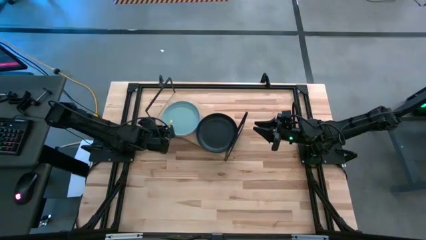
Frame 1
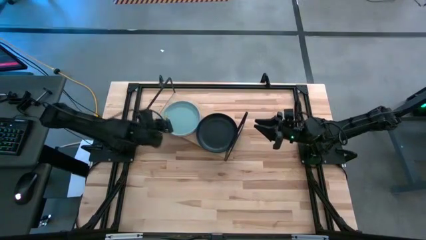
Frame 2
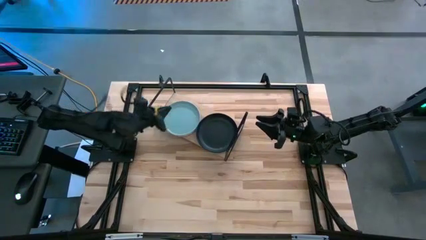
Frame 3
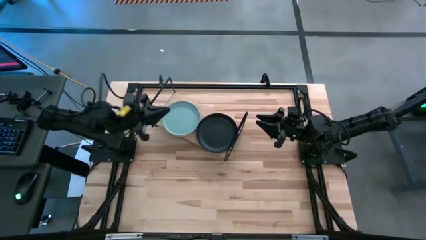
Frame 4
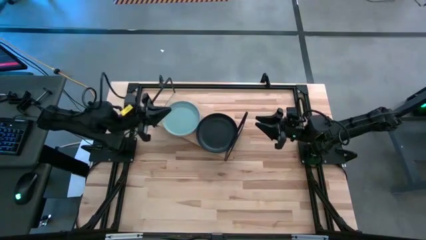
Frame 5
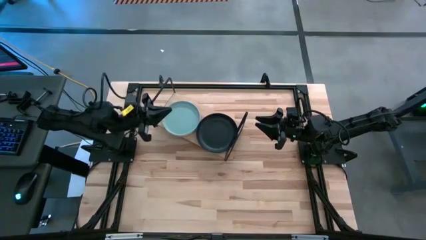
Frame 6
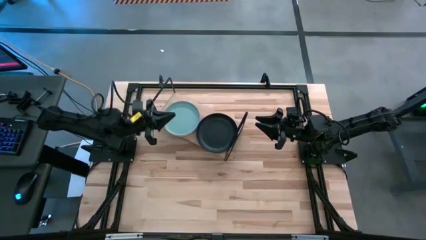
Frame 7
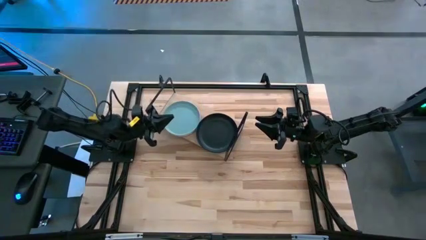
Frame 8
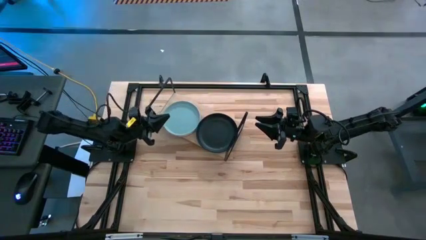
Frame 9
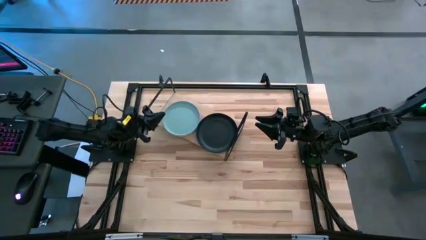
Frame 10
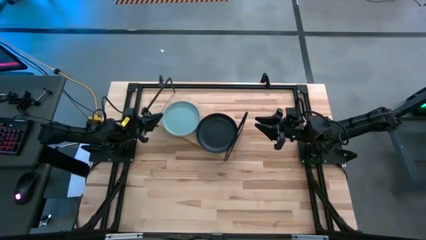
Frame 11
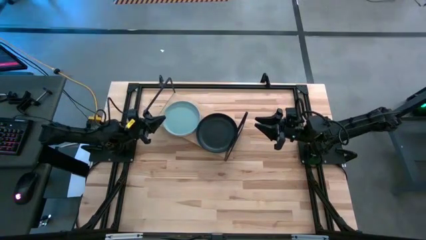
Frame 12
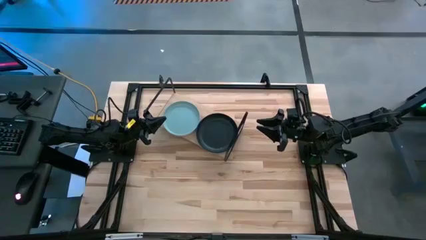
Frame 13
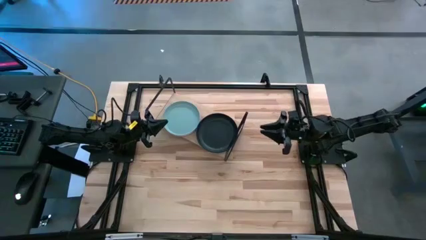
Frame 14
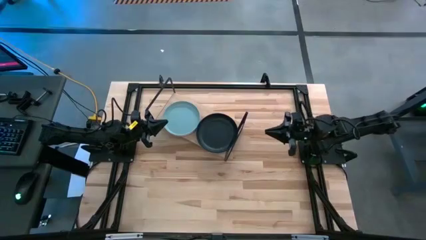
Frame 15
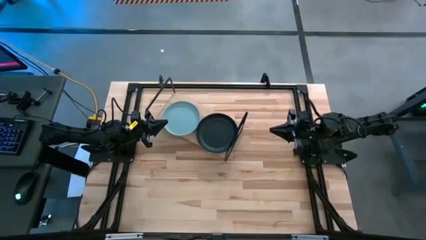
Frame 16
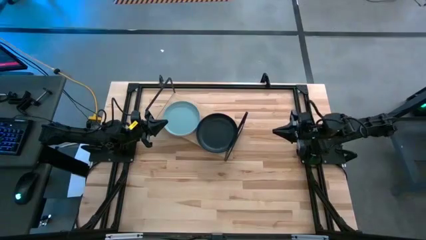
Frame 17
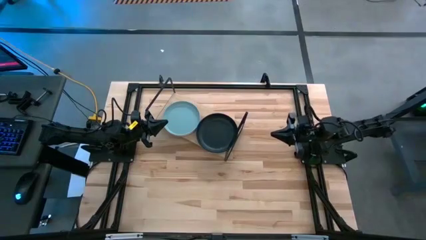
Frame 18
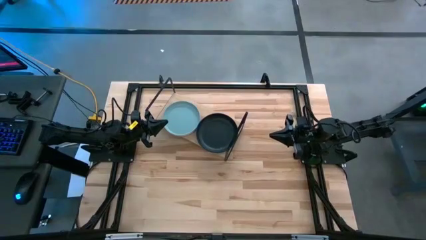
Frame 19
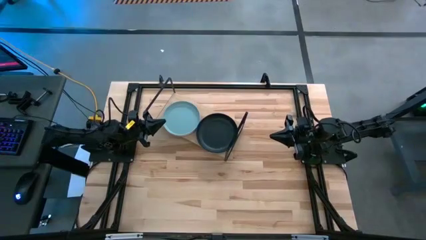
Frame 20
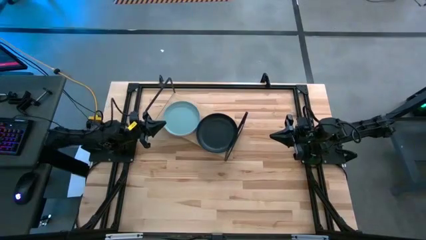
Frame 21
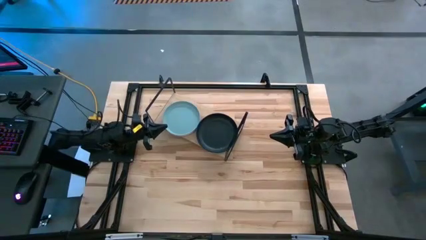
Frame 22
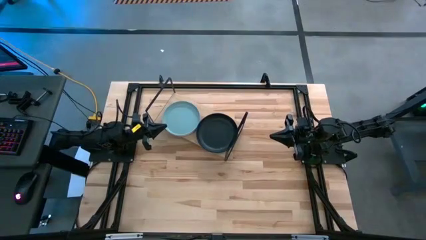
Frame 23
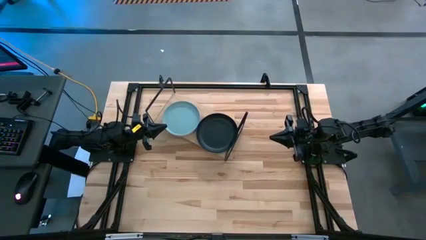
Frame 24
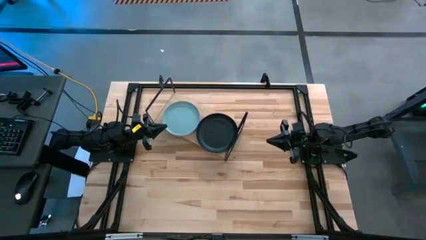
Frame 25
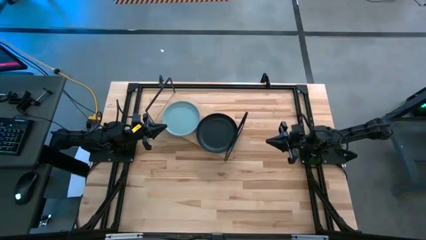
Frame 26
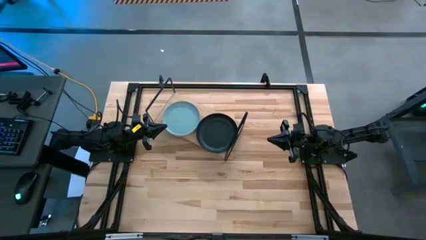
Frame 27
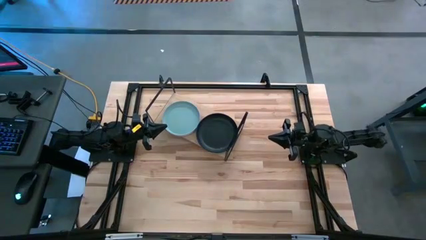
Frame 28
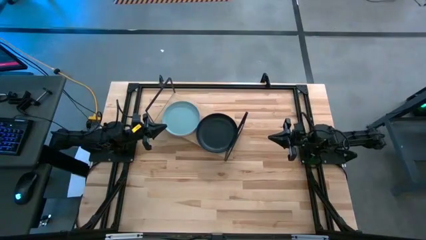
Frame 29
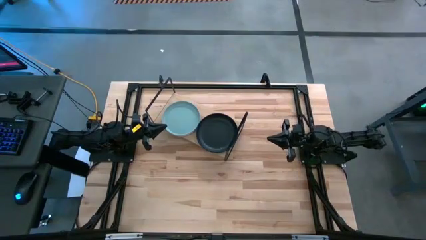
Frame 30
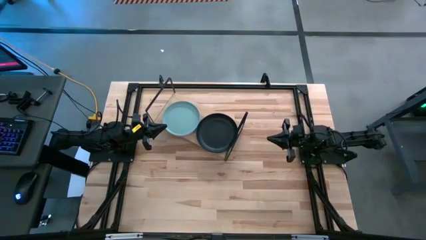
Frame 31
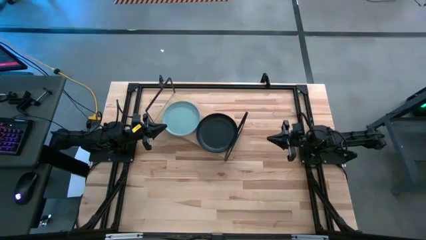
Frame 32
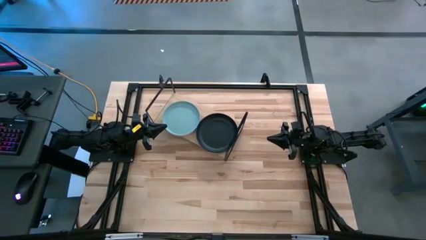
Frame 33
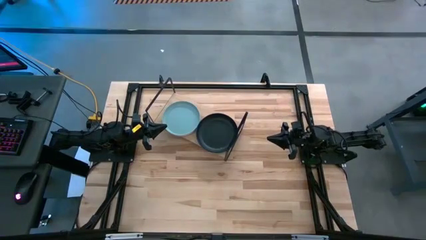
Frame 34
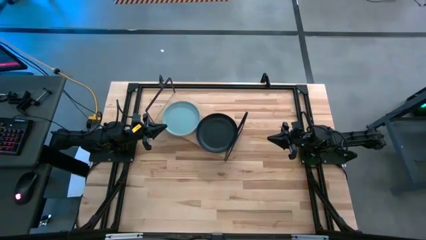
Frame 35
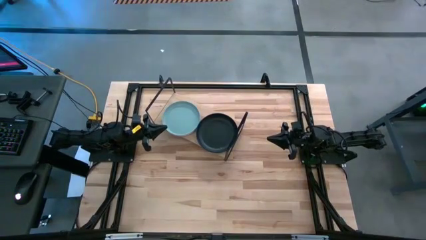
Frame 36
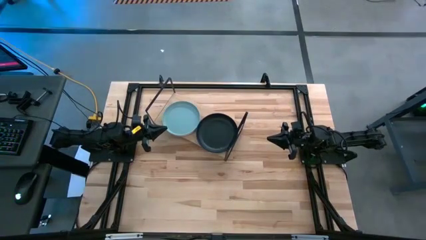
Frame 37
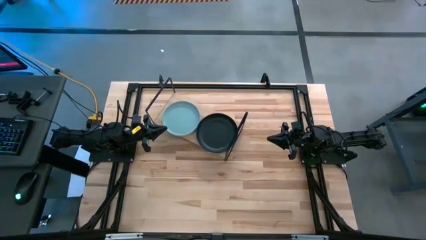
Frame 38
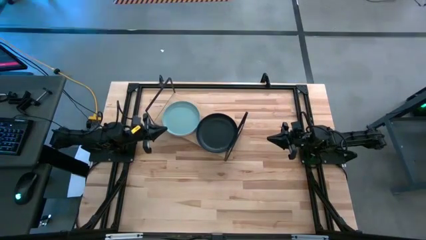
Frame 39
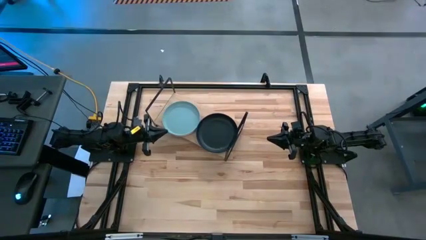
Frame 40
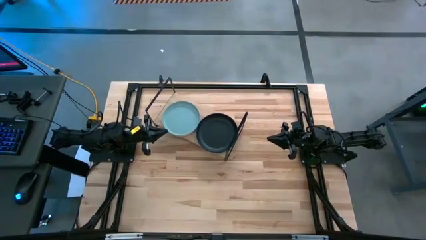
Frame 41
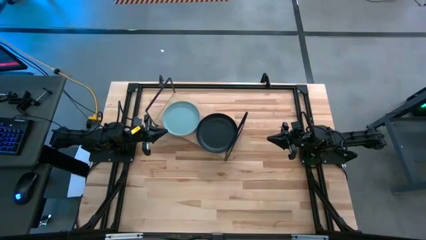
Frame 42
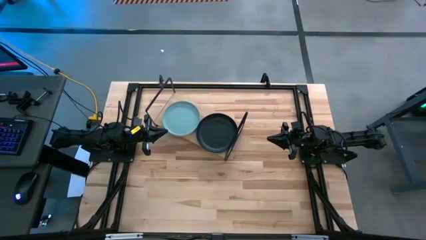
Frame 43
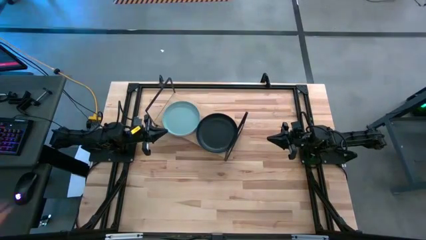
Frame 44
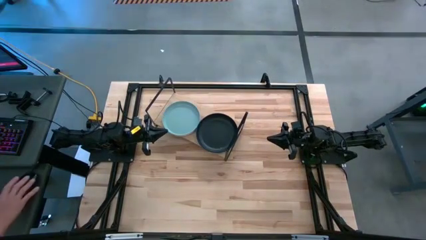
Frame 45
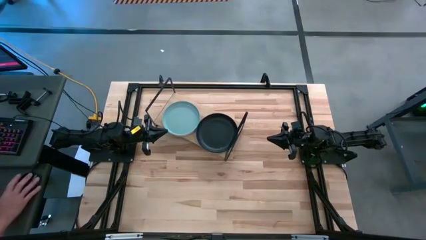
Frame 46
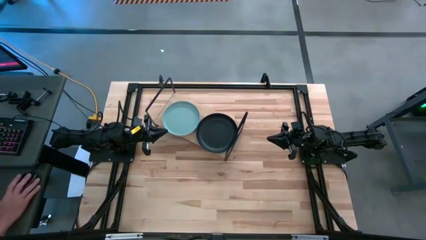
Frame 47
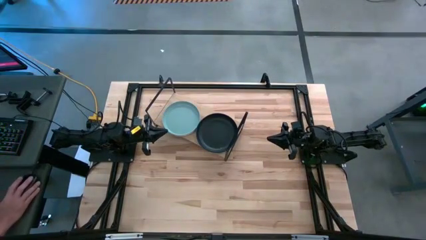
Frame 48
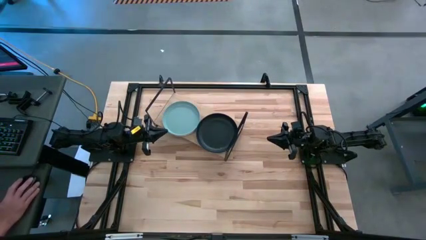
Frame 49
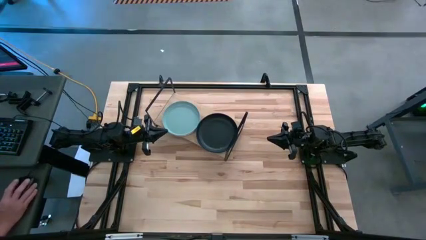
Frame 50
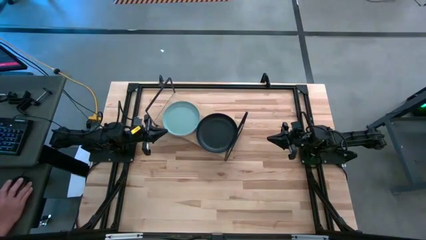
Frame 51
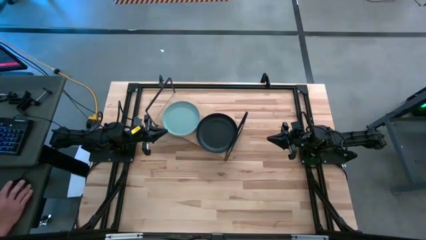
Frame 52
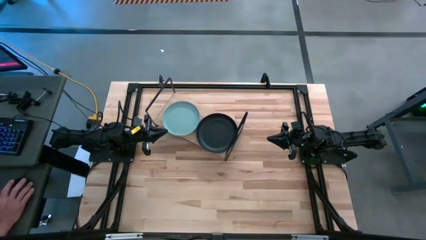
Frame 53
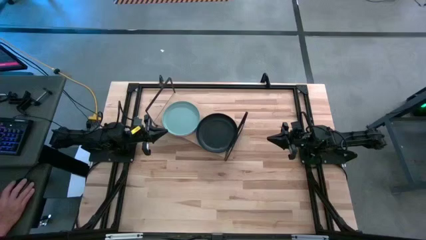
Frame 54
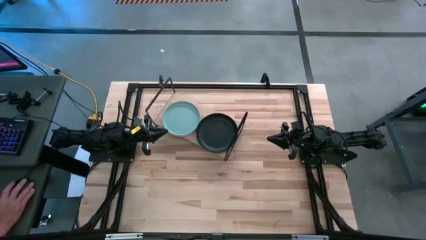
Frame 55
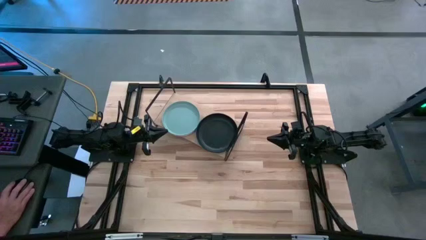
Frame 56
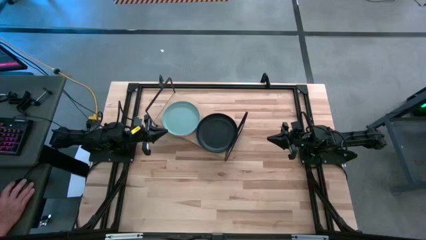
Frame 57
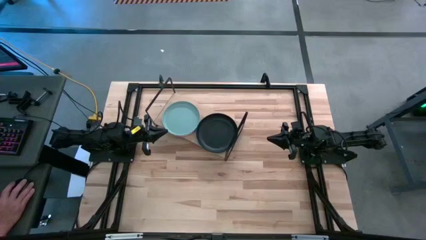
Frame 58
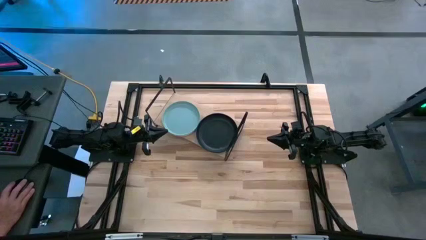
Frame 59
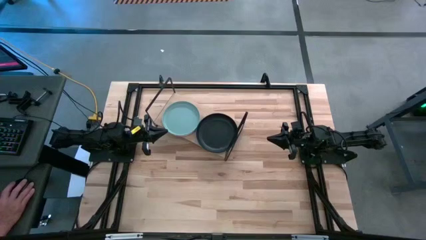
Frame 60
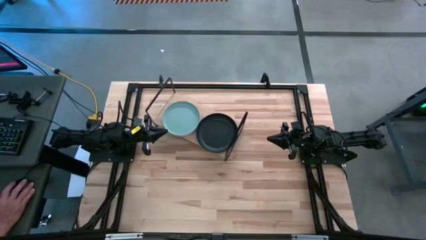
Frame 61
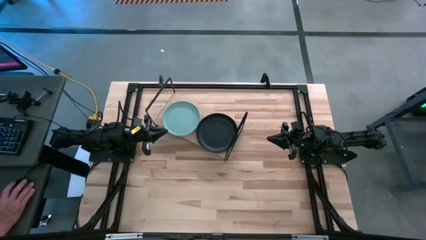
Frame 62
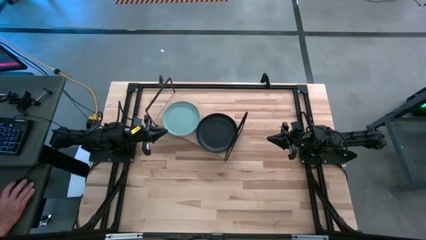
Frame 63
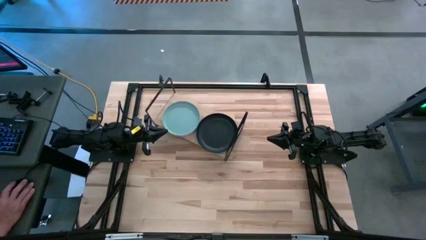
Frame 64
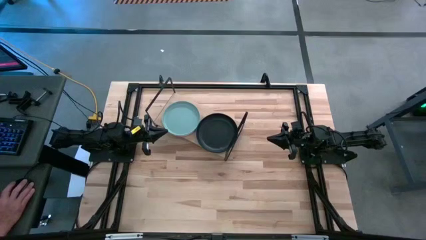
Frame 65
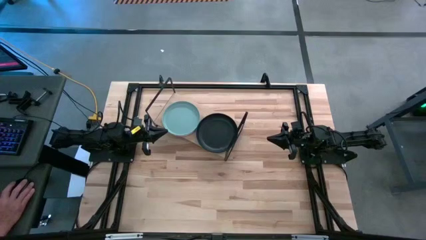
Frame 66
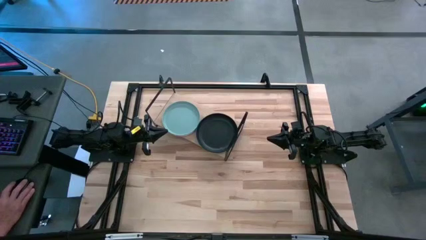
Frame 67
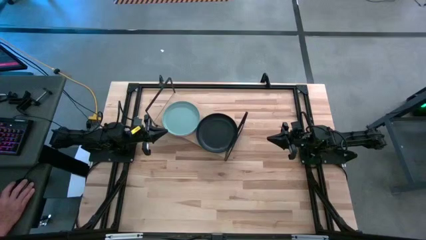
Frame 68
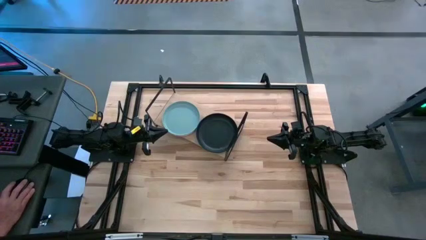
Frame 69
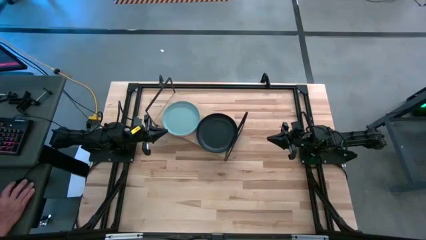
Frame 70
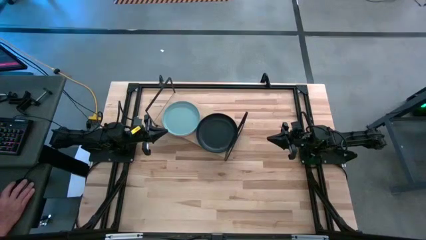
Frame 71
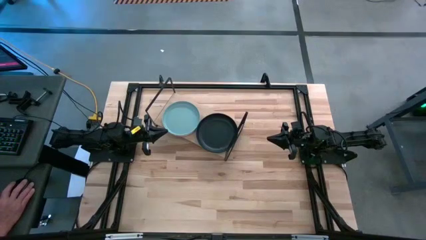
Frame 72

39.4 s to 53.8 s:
Task: Place and stack plates onto a shelf
Return to Home Position
